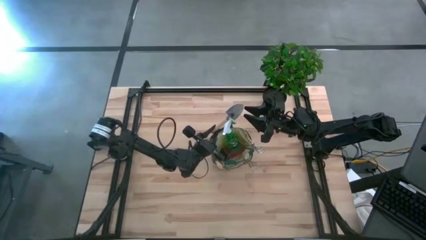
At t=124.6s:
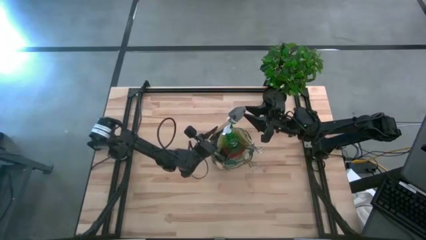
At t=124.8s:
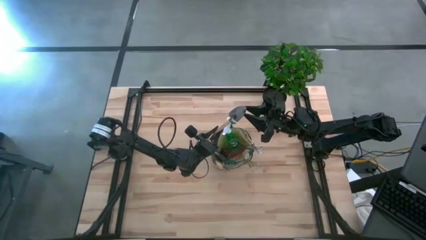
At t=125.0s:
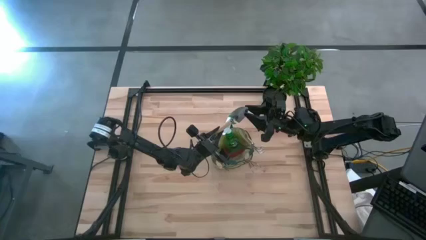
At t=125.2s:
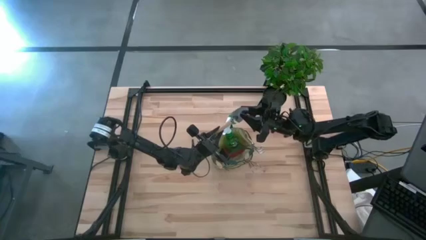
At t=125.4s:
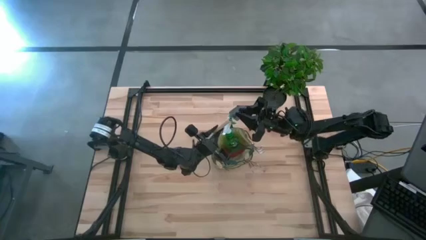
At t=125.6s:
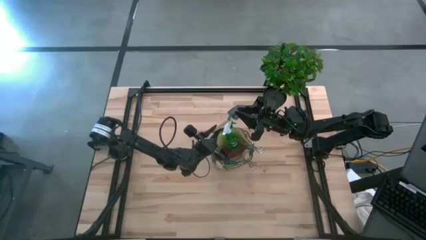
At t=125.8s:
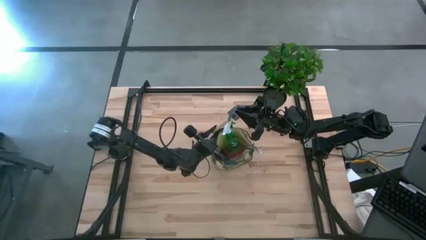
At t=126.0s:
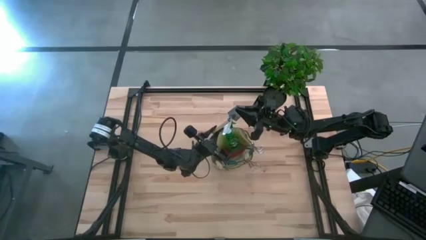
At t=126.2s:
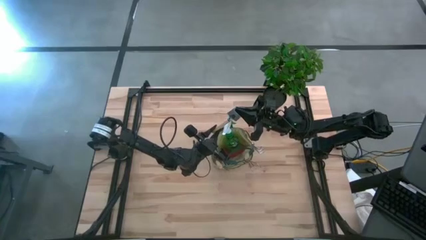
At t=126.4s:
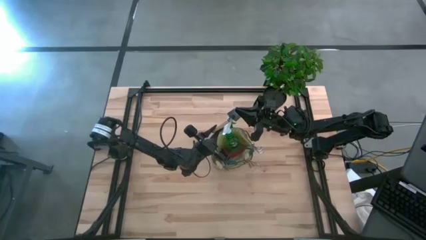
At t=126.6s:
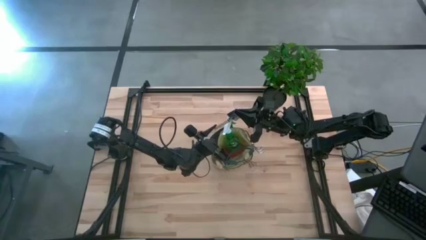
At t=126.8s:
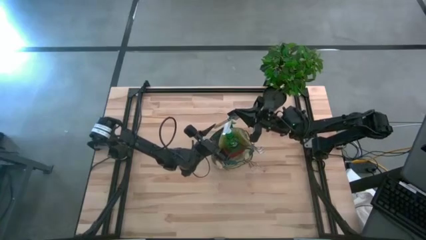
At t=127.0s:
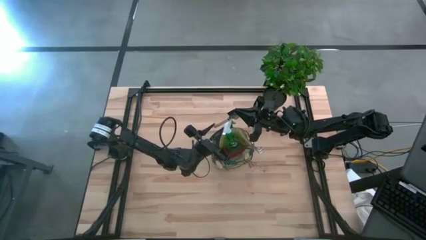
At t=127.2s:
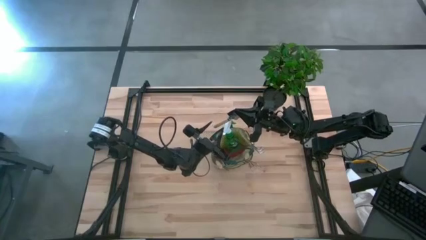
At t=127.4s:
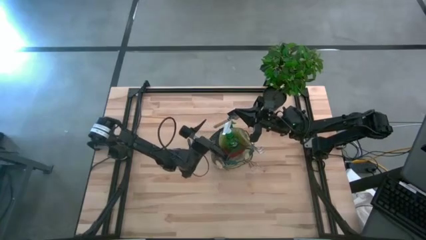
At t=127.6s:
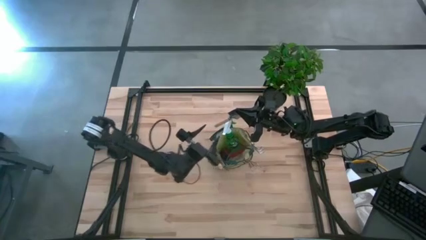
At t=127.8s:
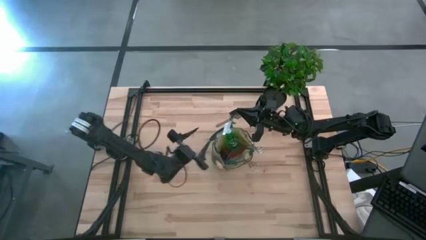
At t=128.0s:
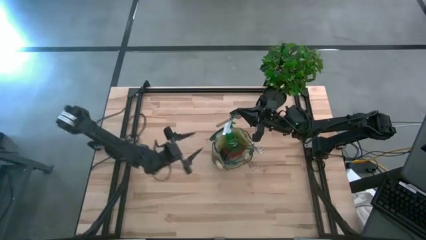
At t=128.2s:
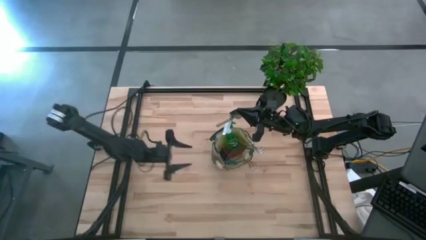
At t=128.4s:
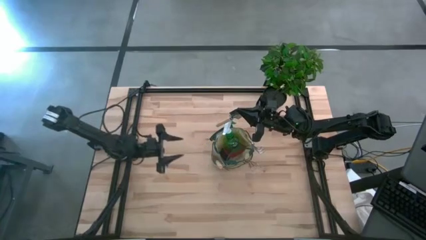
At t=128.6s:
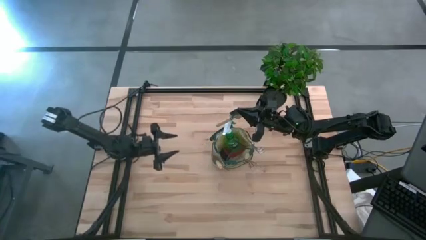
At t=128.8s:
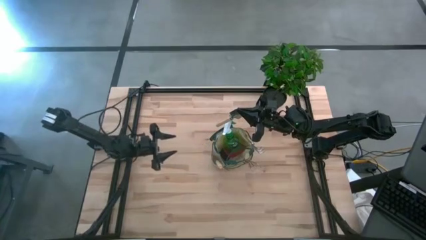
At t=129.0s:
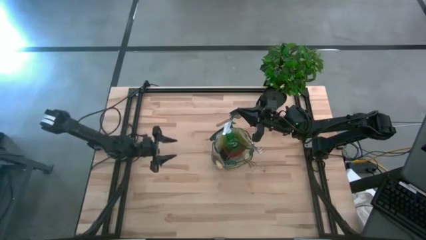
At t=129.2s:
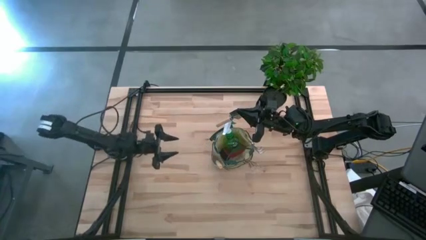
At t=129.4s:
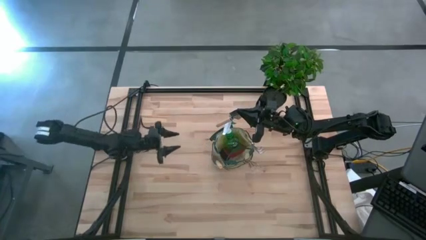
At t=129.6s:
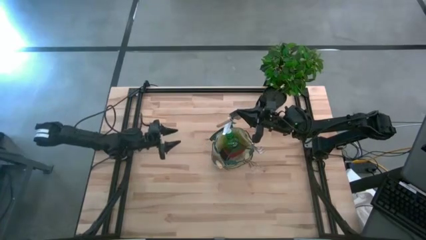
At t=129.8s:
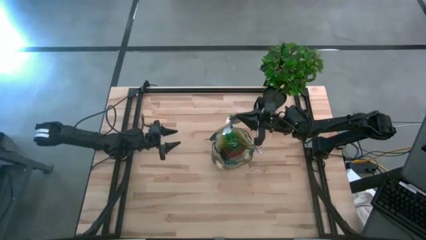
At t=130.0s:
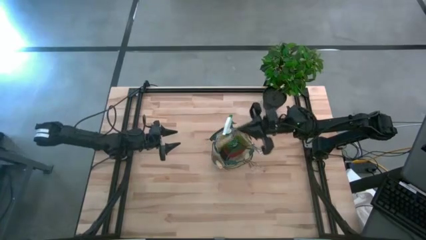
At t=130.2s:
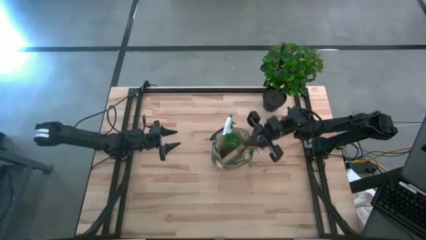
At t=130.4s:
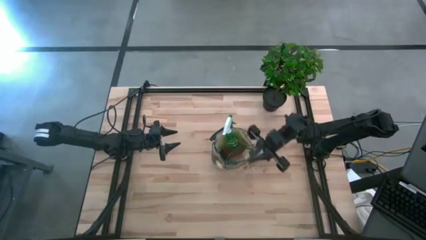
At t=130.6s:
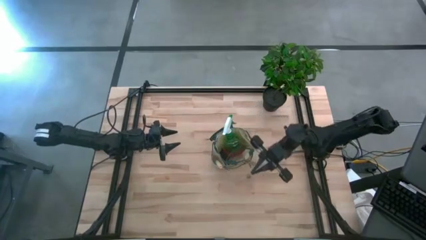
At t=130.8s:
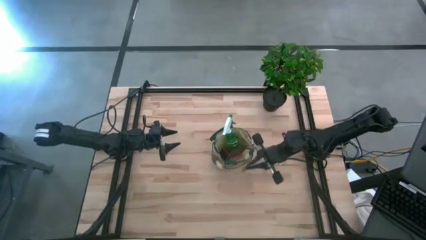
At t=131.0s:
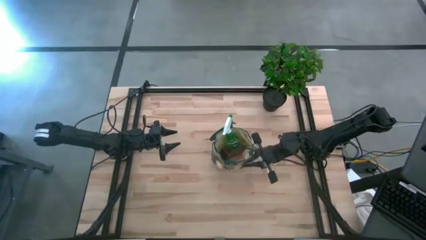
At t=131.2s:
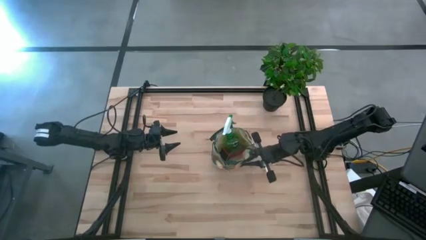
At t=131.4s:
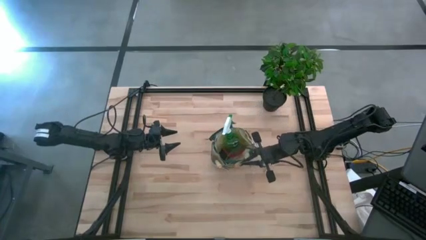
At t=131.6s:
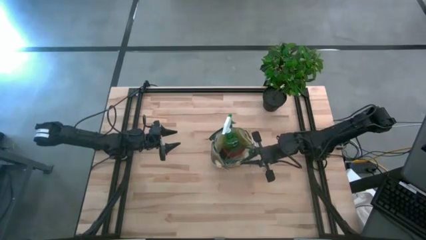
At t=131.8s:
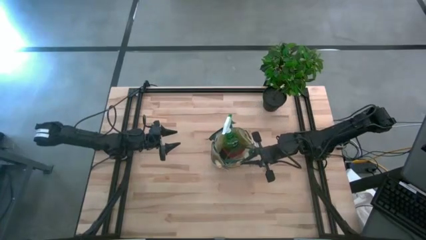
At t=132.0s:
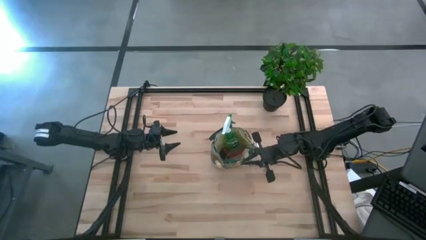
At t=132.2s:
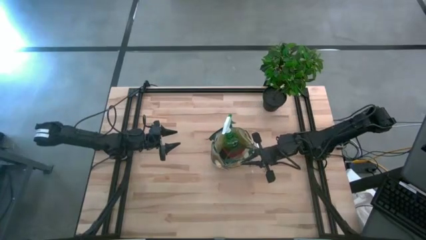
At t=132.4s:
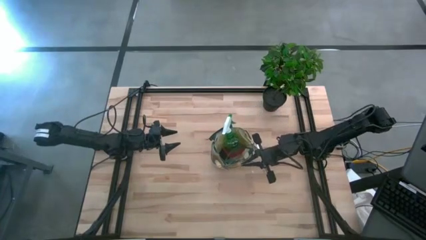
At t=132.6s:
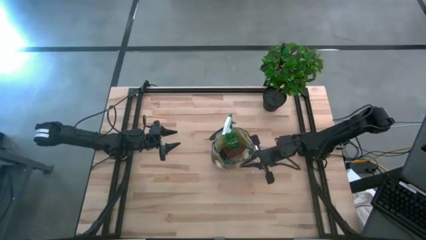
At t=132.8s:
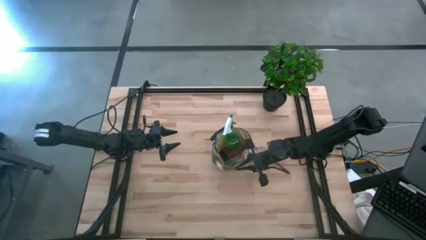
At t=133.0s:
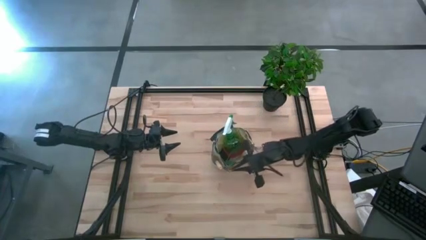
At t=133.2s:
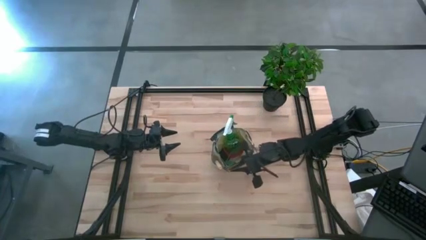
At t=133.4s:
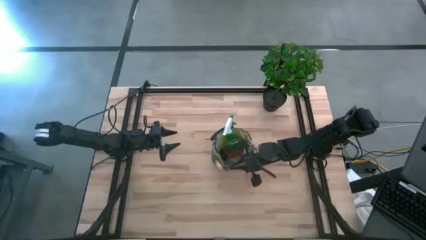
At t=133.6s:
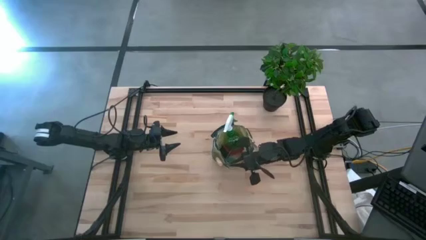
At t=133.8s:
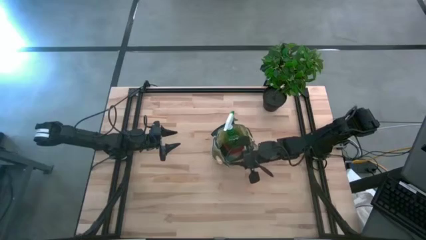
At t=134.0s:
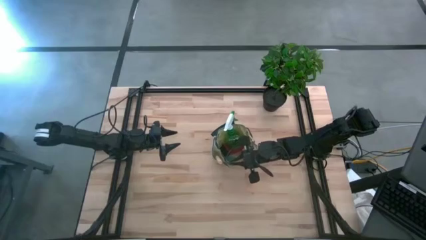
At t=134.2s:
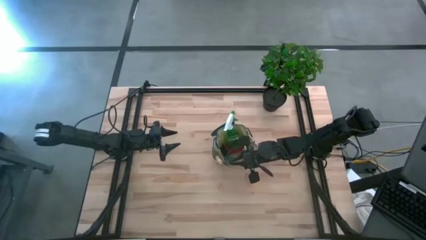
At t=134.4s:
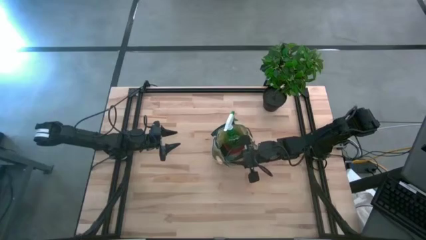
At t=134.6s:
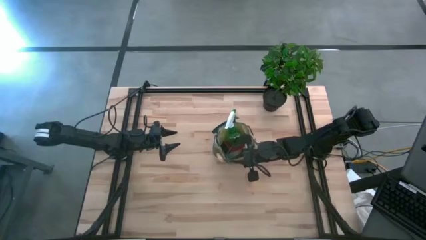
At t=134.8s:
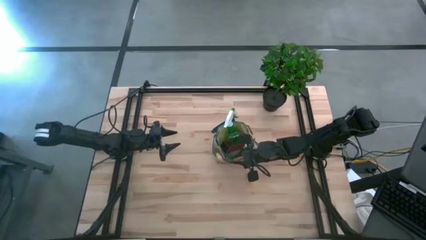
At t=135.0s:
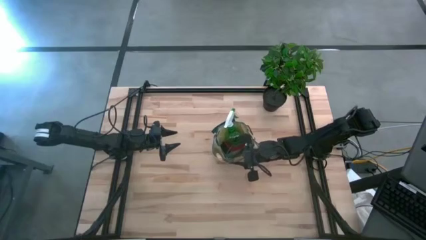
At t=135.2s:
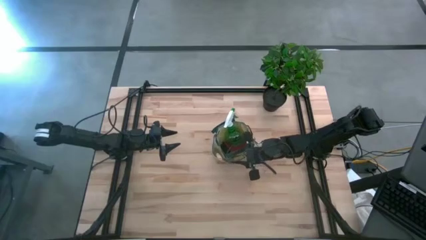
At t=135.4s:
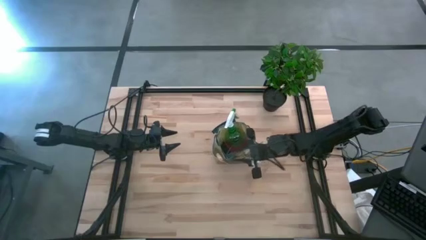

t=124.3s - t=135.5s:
Task: Pick & Place Garden tools in Gardening bag
Put the brown trowel into the green gardening bag

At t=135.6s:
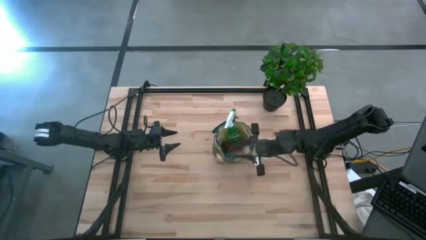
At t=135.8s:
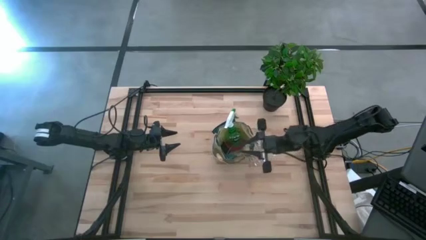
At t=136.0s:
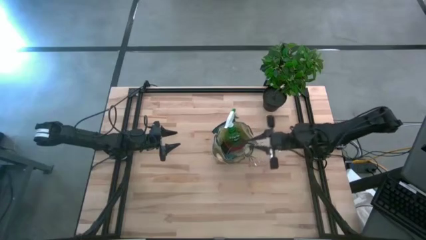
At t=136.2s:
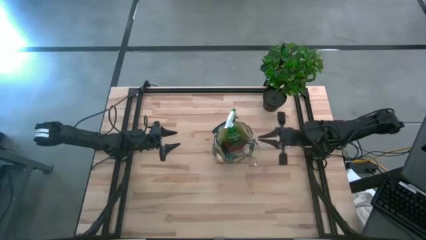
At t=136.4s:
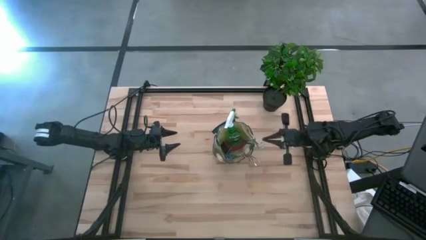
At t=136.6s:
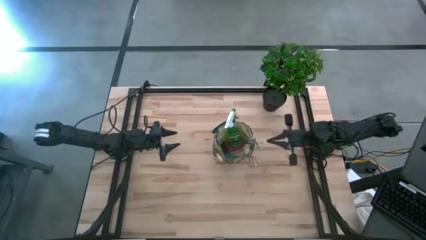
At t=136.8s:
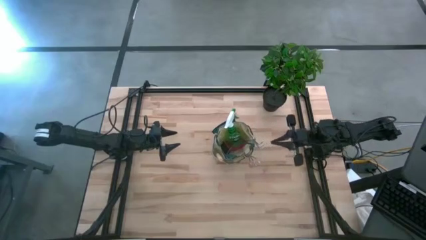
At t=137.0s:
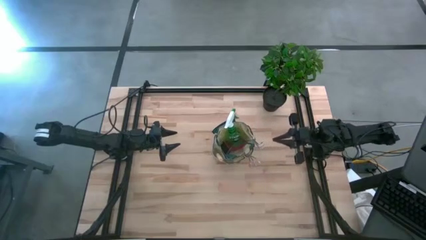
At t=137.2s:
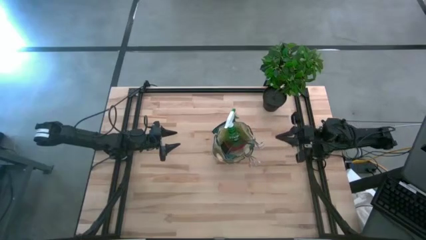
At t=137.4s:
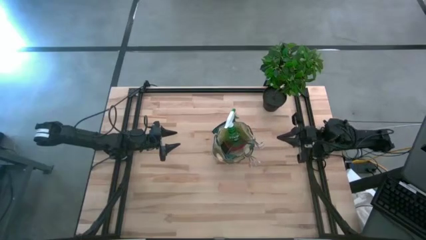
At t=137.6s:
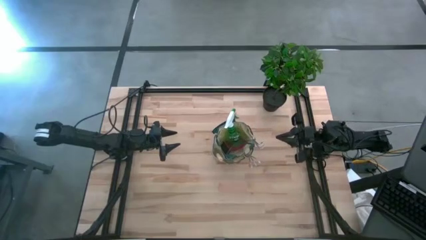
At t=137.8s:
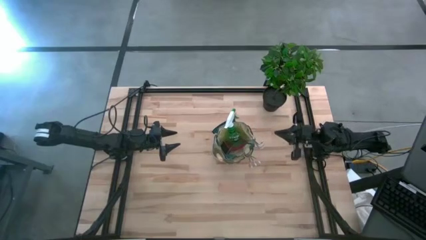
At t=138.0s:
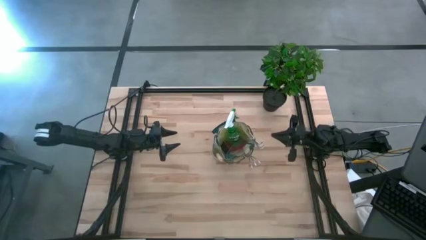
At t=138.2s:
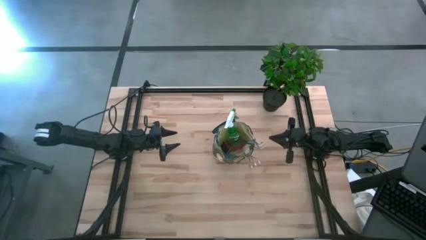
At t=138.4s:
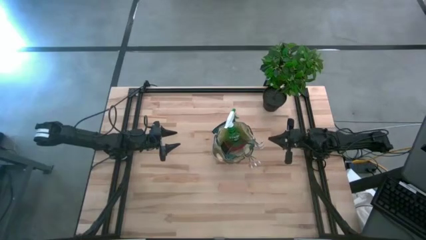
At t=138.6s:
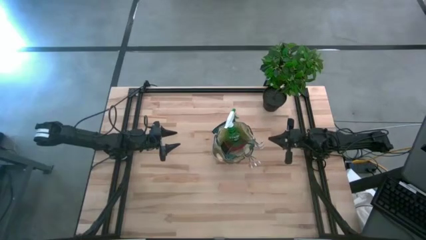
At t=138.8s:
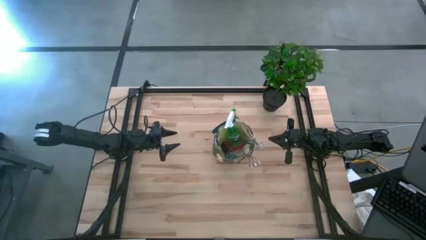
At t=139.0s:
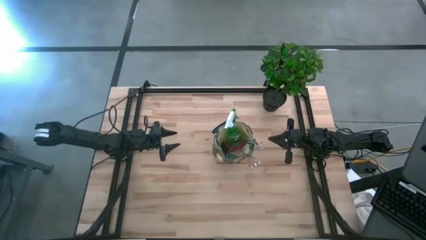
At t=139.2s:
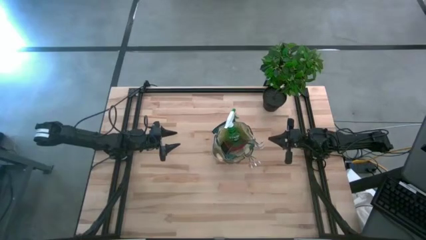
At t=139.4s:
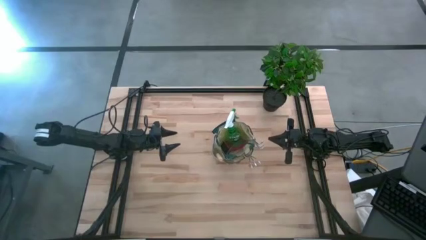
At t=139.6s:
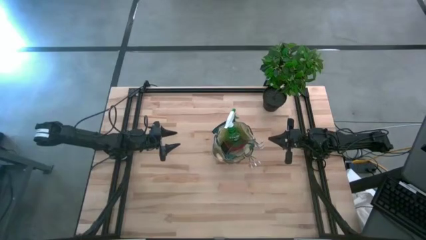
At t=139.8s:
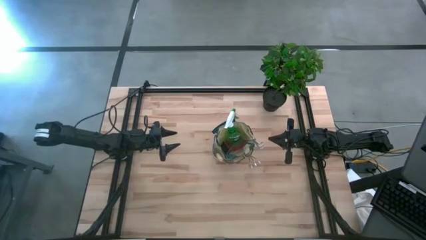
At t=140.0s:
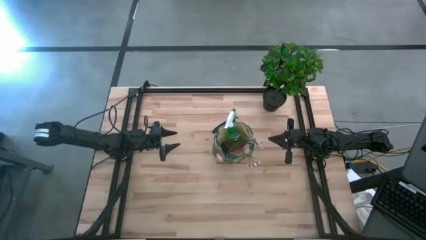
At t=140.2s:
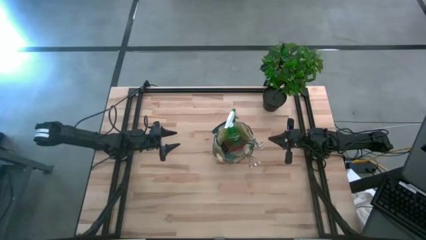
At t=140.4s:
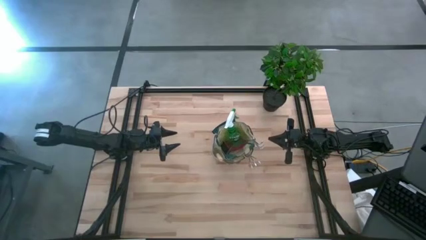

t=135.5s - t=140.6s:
Return to Home Position
